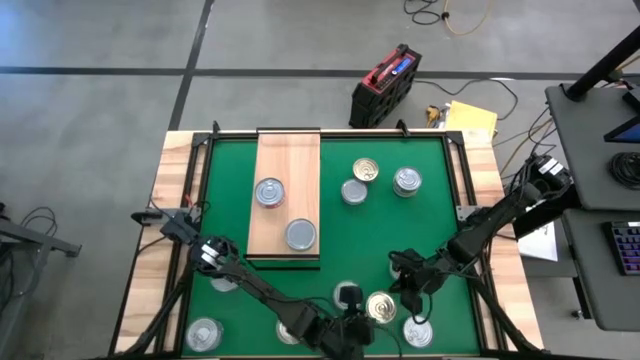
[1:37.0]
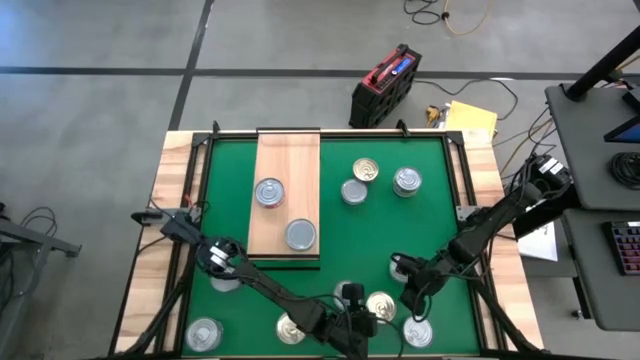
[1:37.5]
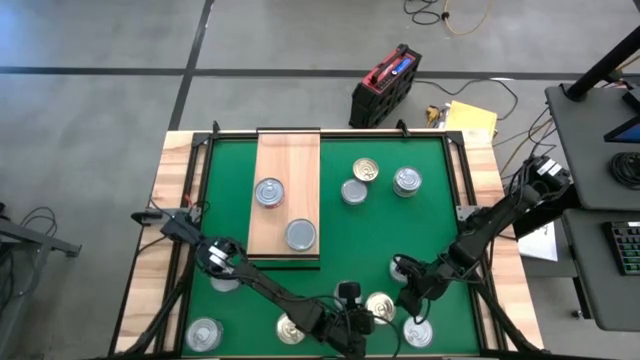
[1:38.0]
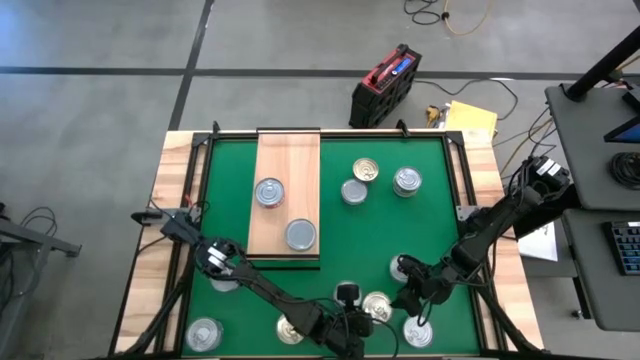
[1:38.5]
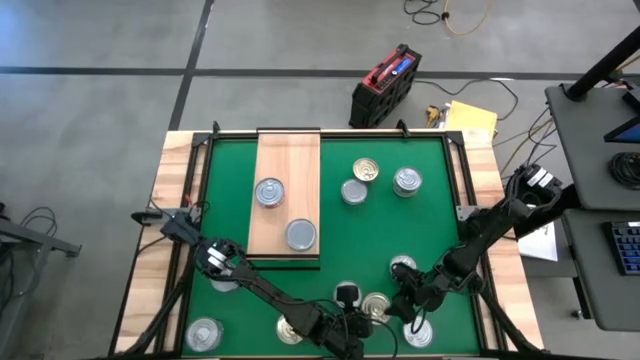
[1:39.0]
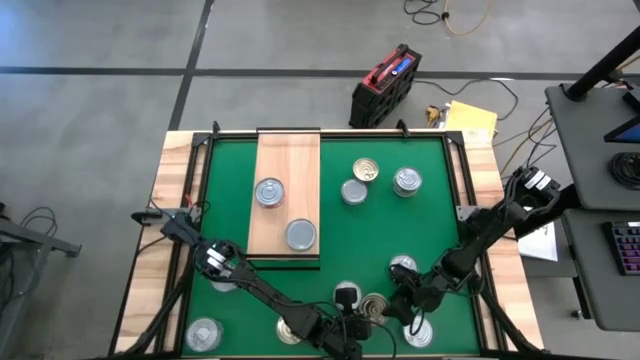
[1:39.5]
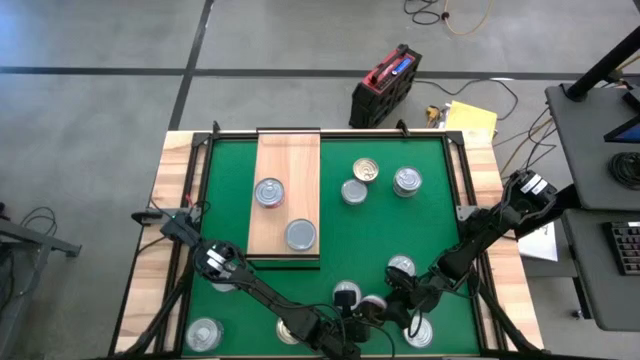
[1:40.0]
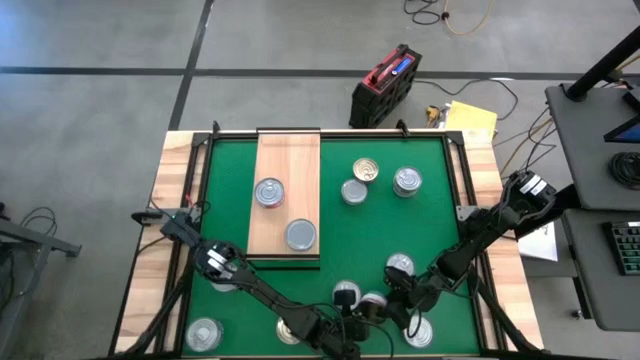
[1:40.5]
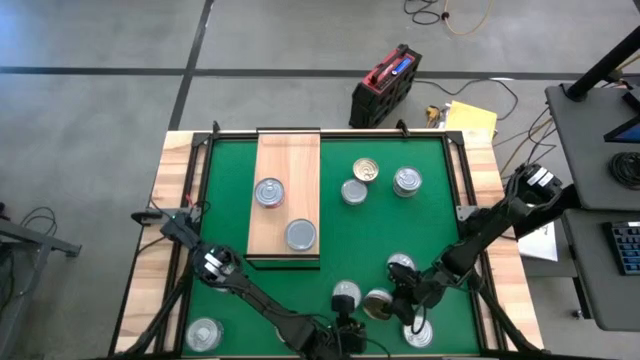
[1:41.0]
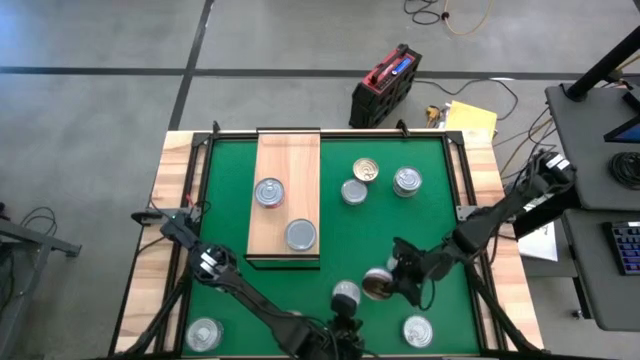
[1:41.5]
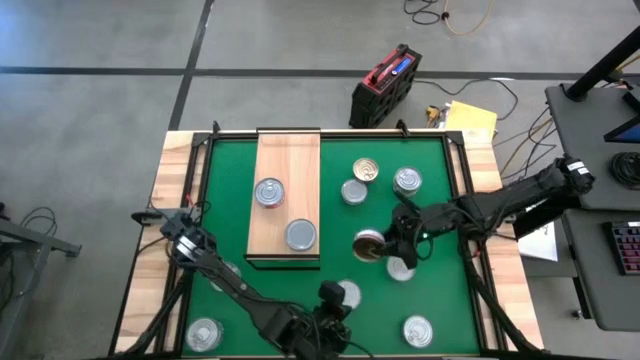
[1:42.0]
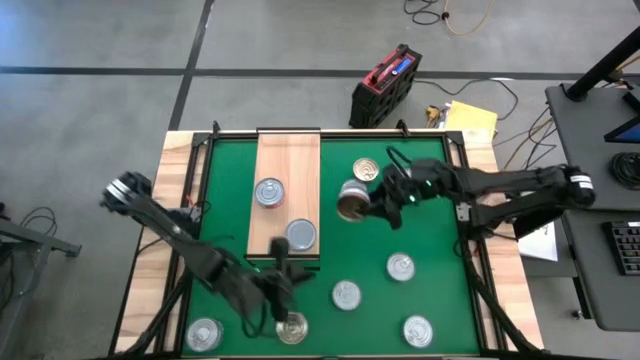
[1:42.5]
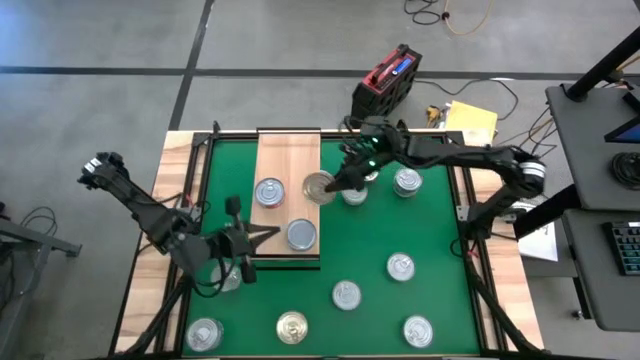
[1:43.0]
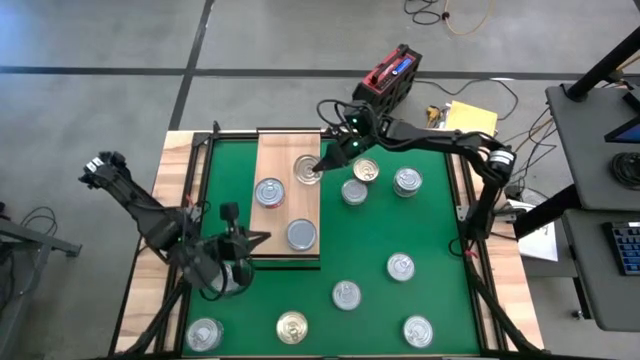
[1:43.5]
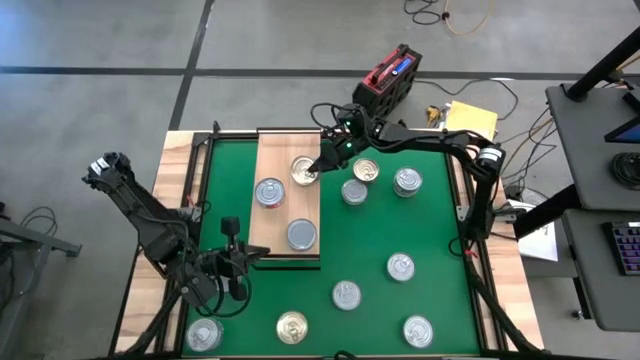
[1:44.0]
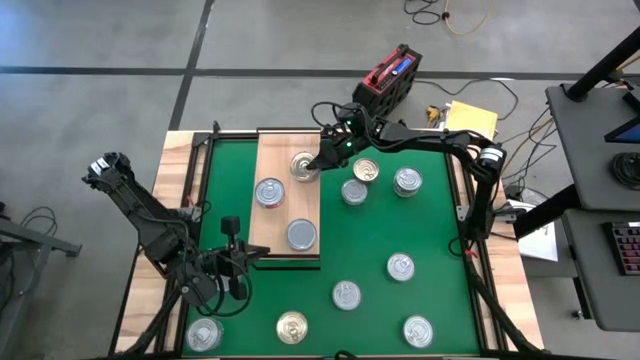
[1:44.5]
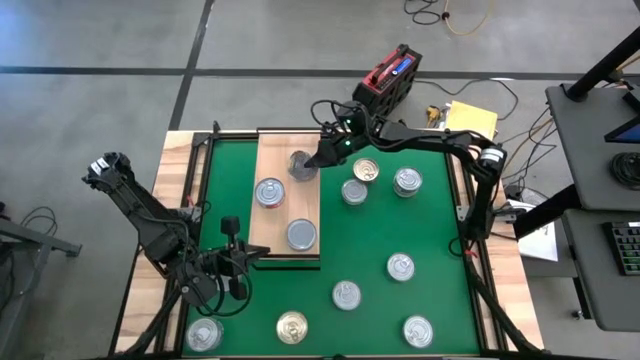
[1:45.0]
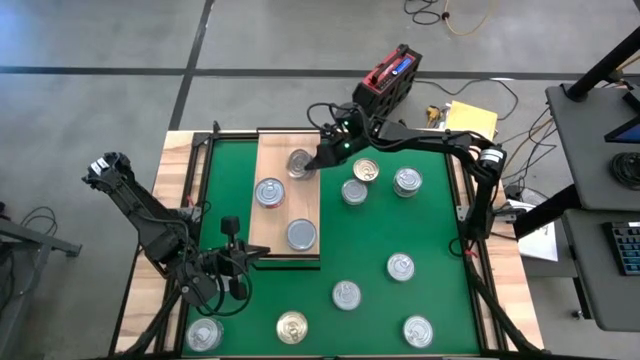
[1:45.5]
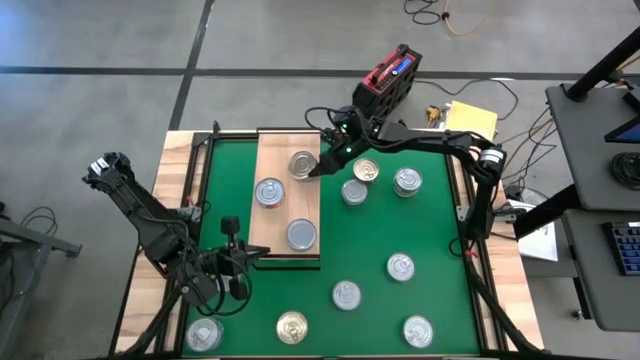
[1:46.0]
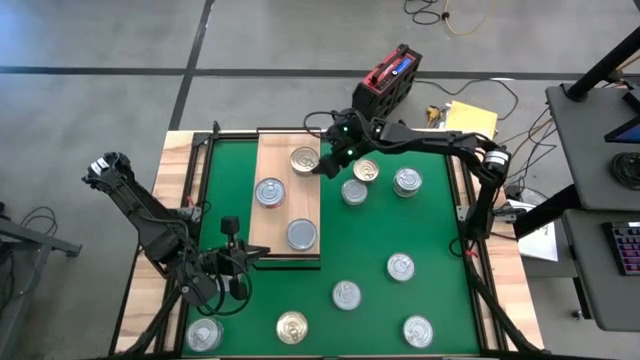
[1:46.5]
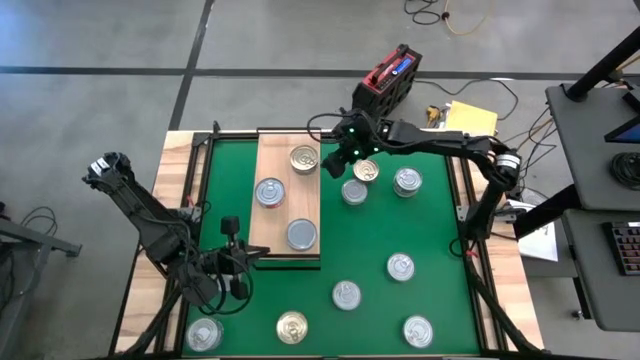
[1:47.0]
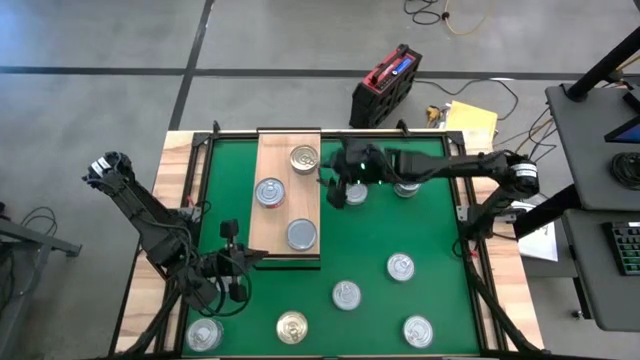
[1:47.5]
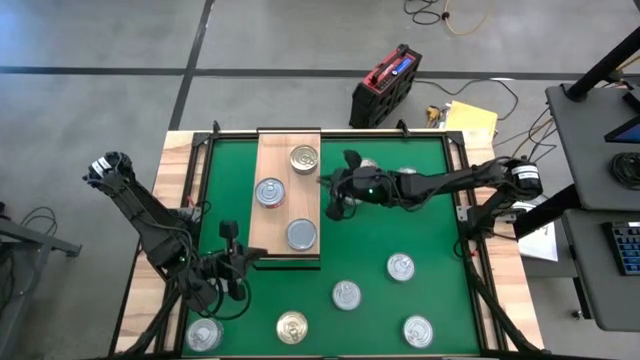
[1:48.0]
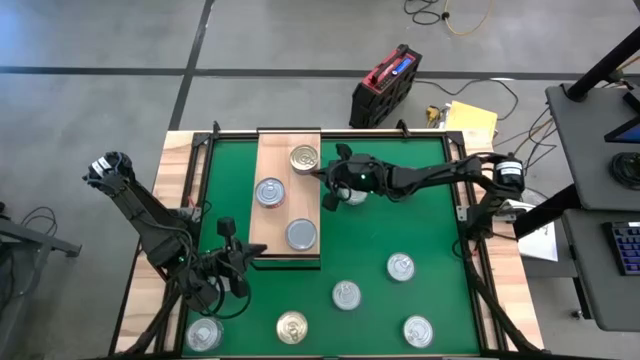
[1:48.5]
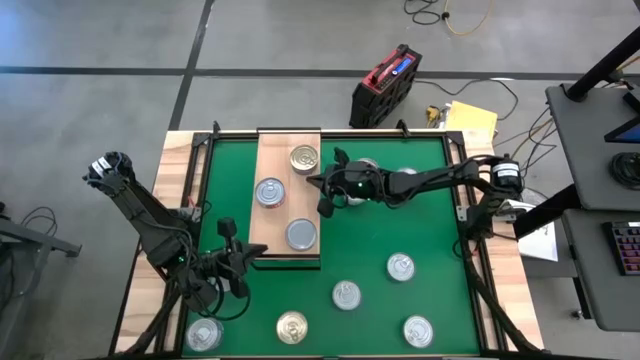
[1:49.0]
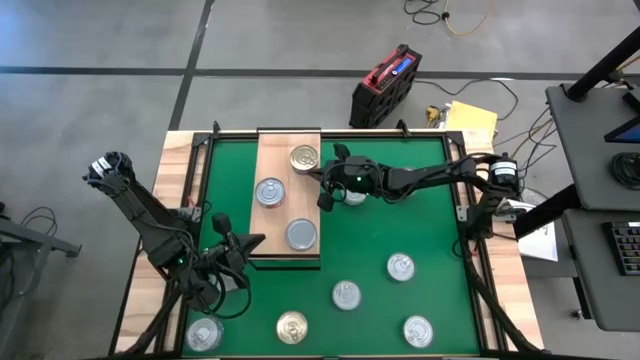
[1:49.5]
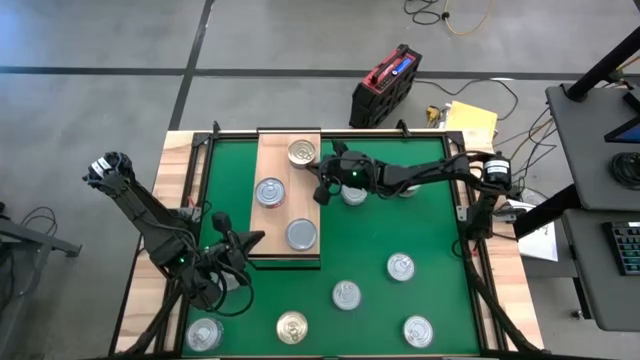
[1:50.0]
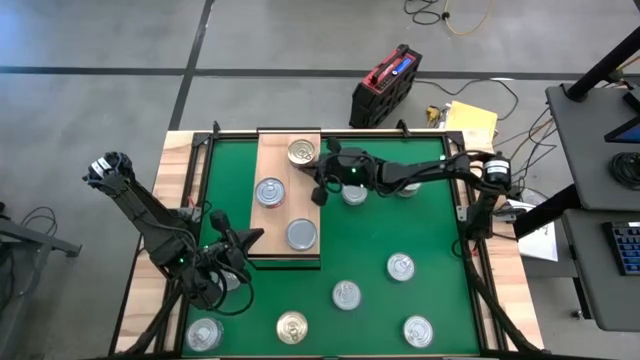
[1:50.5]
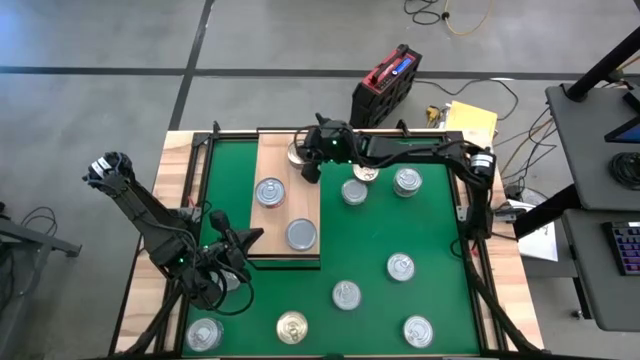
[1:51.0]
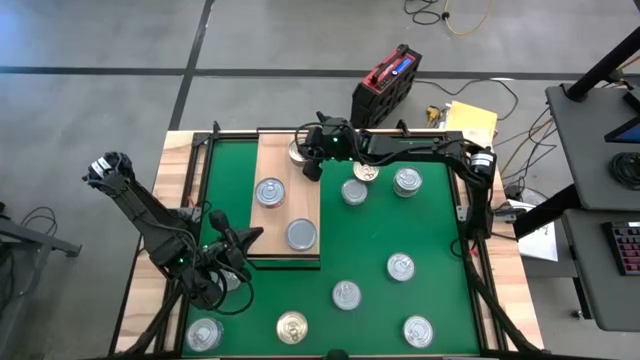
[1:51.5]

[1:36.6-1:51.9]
Task: Stack canned seafood by type on shelf
Put the blue and pink tuna can on the shelf

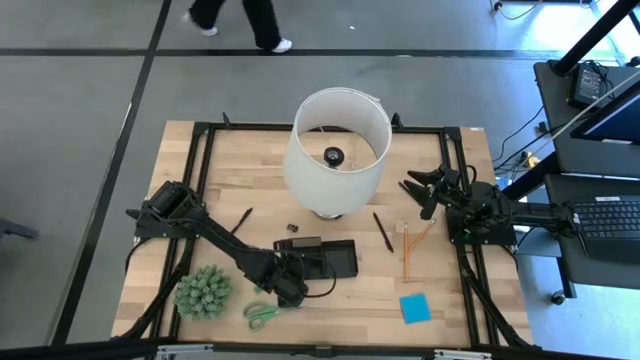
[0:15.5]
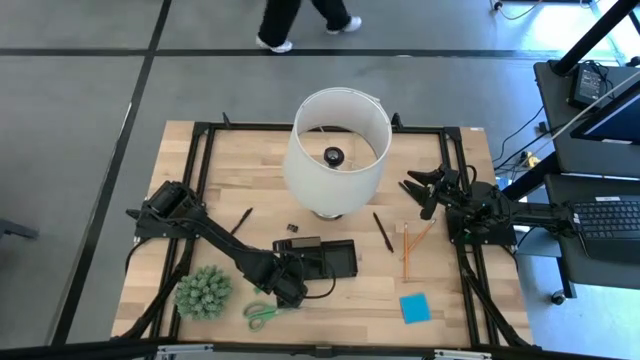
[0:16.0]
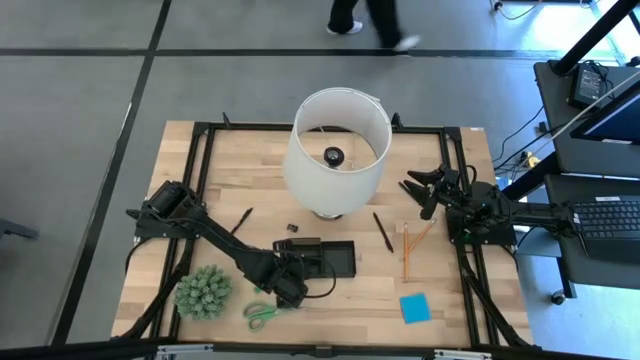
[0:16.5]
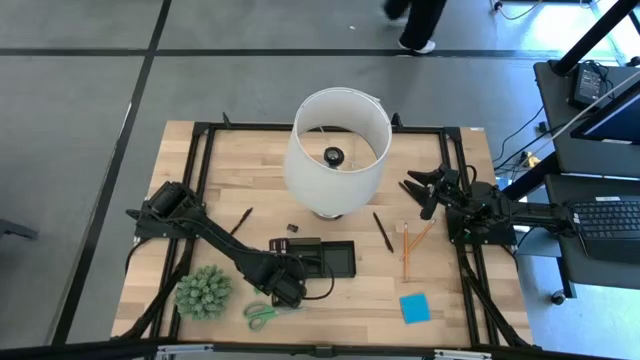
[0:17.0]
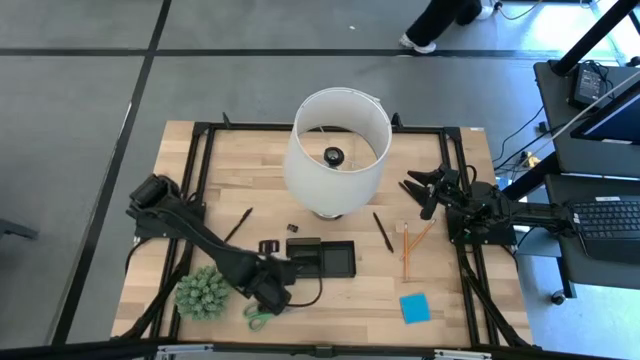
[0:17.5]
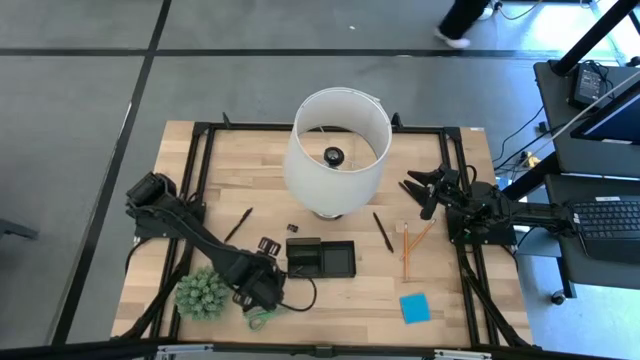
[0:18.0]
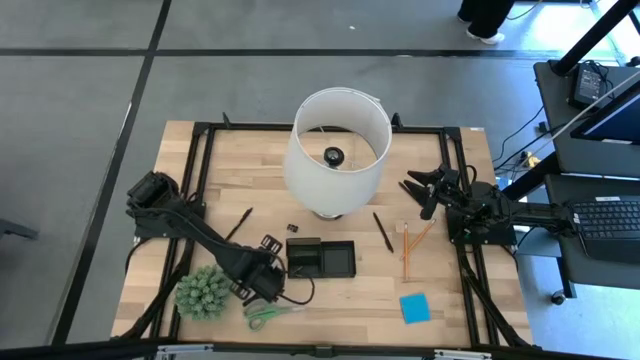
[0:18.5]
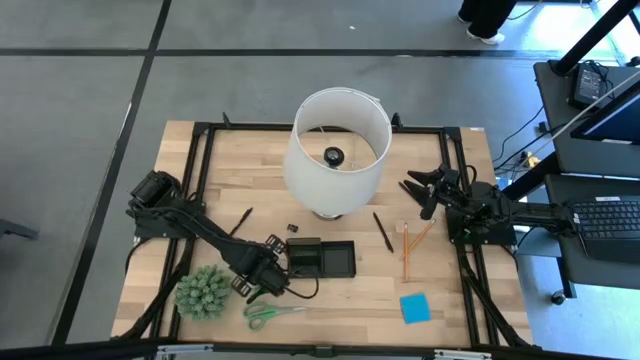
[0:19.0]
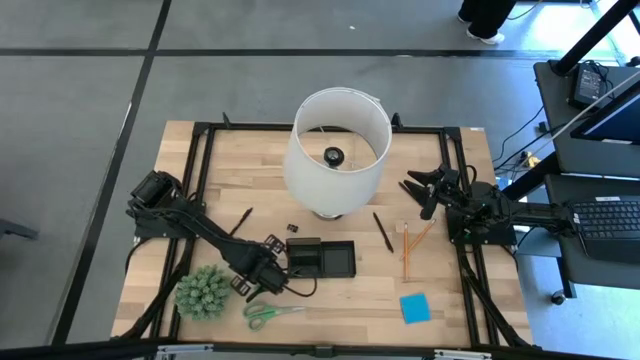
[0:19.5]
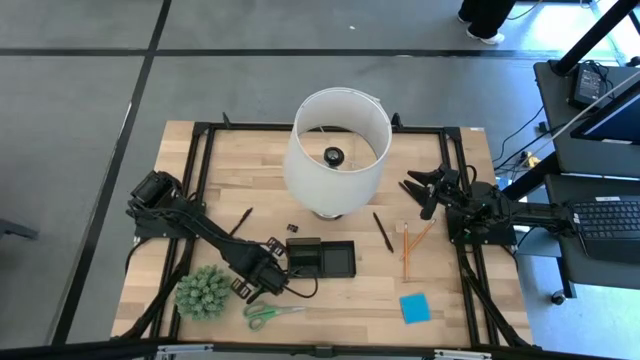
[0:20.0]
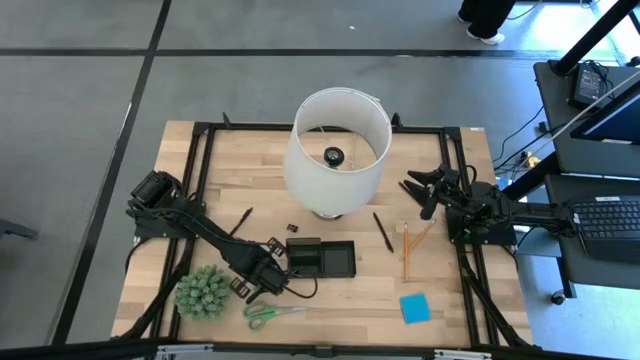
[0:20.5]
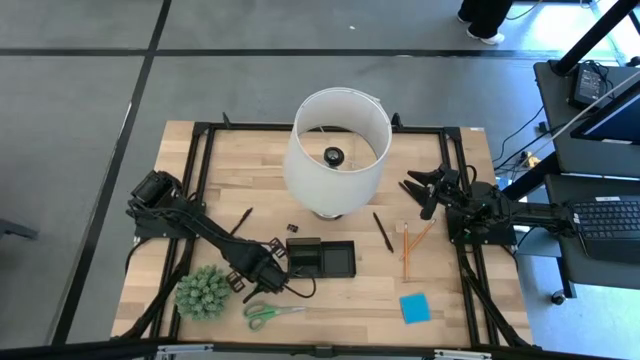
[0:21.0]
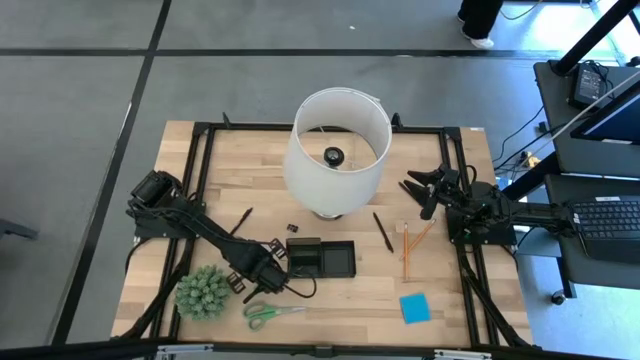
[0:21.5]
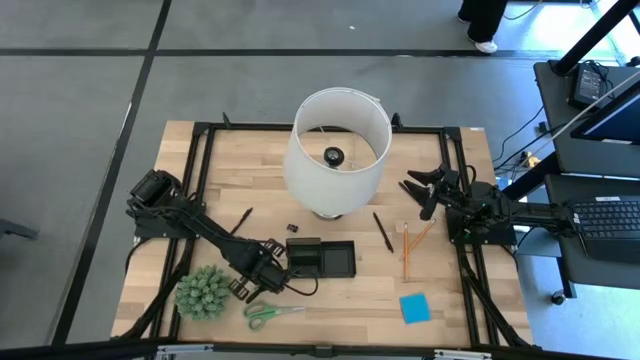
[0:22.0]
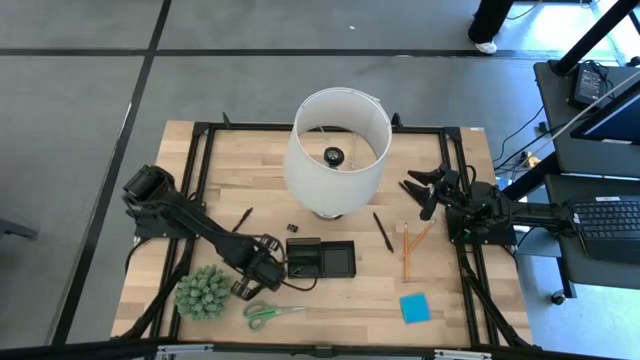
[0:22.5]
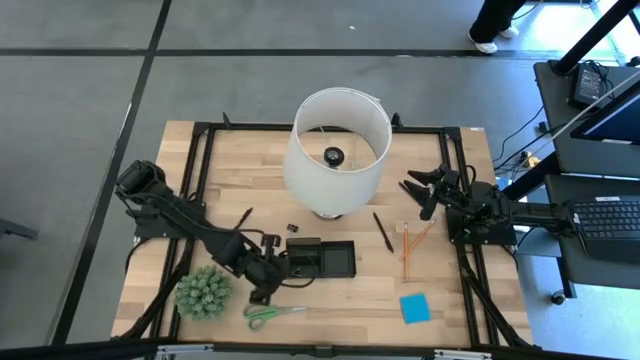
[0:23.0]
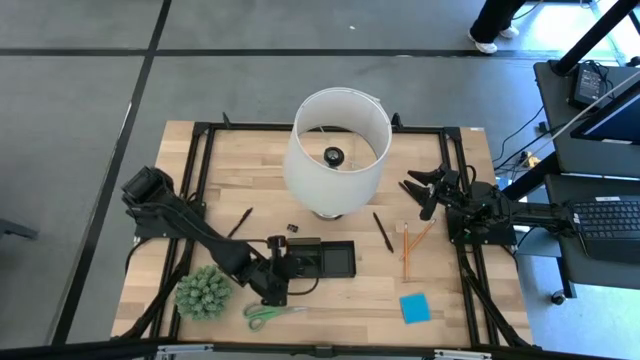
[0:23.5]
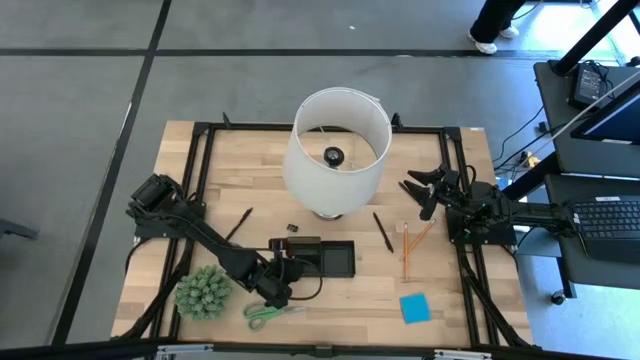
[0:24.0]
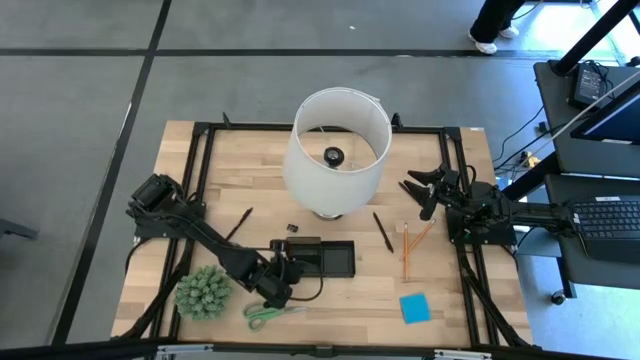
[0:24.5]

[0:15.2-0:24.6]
Task: Pick and place office supplies into organizer
Put the bottom black binder clip into the black desk organizer
